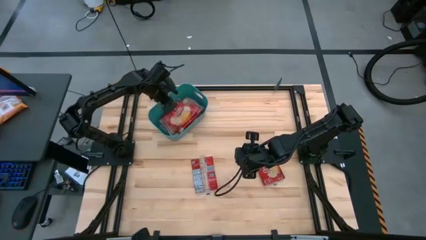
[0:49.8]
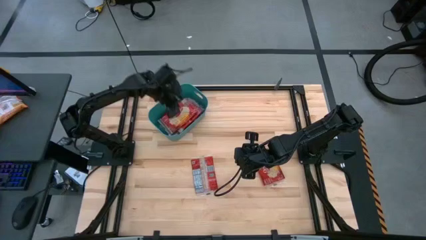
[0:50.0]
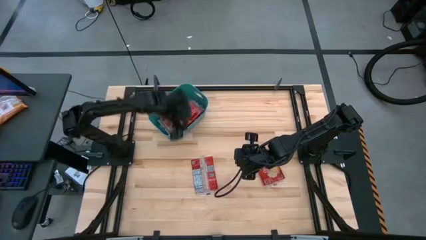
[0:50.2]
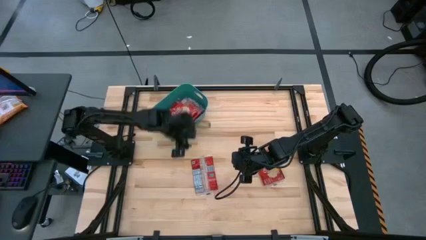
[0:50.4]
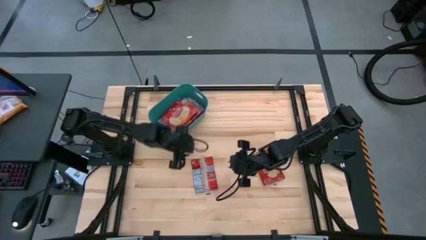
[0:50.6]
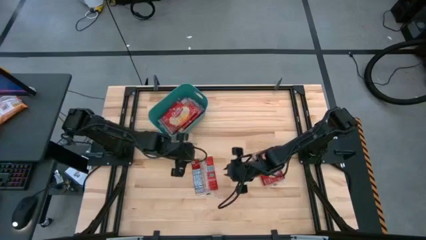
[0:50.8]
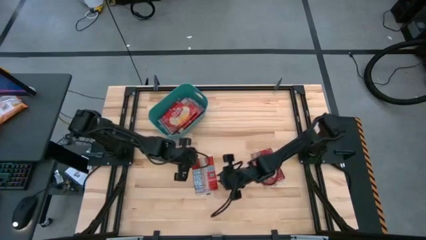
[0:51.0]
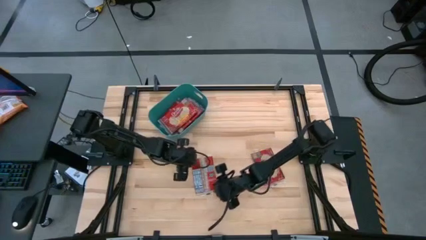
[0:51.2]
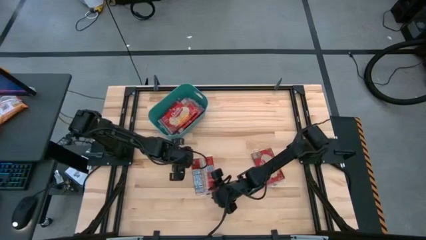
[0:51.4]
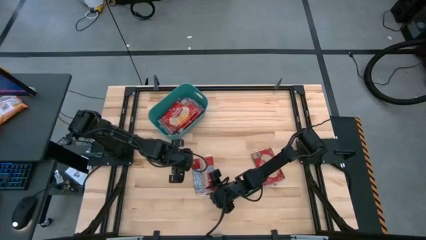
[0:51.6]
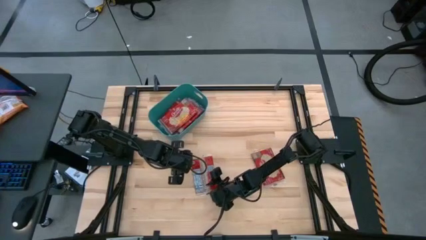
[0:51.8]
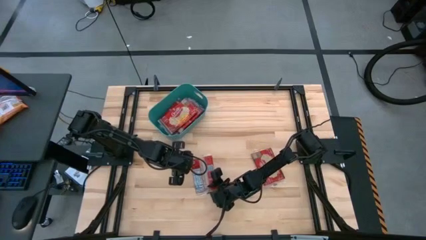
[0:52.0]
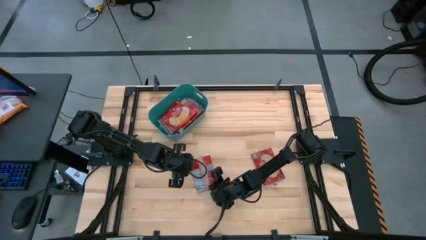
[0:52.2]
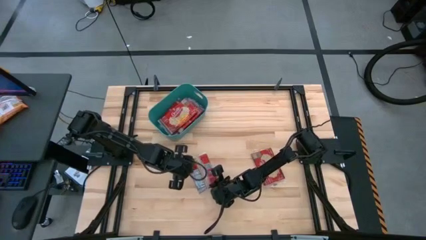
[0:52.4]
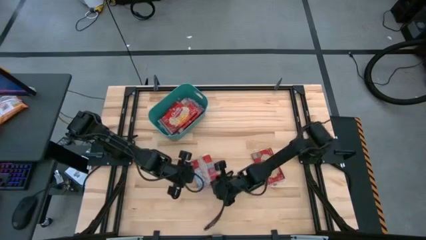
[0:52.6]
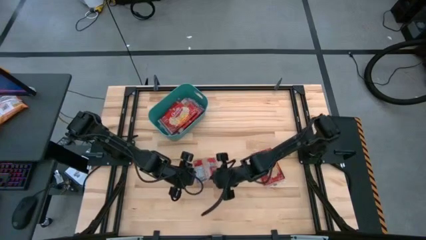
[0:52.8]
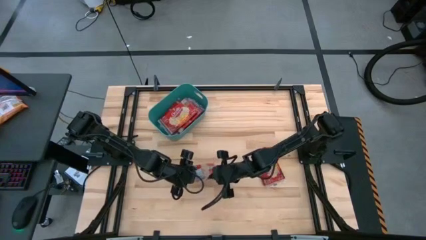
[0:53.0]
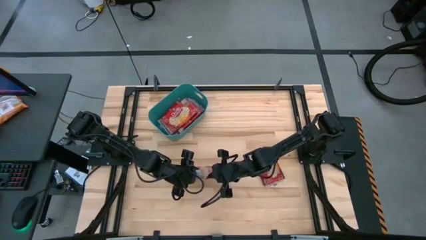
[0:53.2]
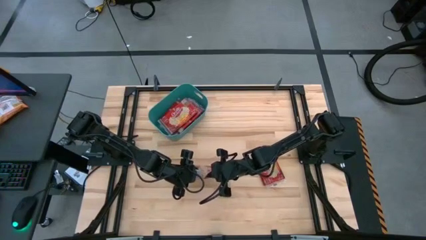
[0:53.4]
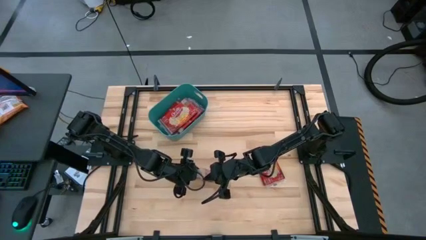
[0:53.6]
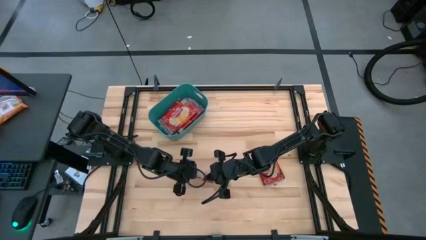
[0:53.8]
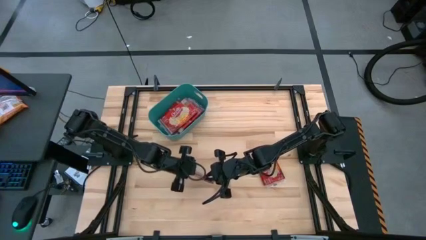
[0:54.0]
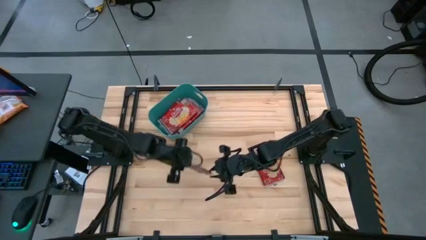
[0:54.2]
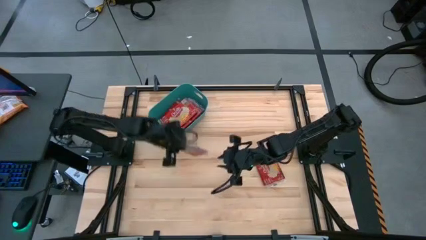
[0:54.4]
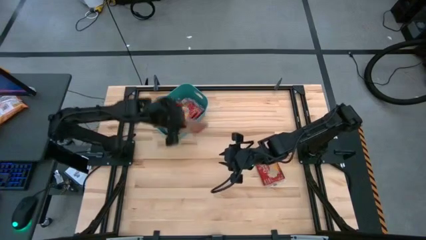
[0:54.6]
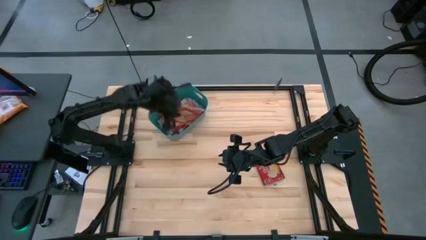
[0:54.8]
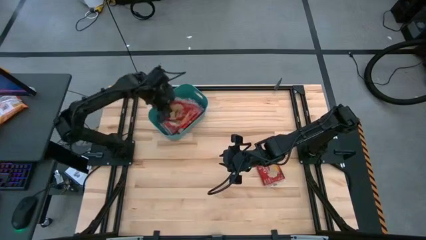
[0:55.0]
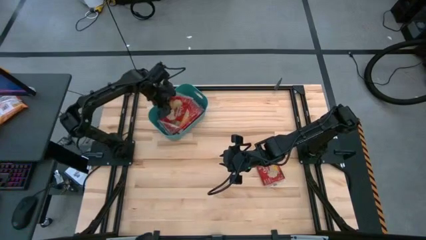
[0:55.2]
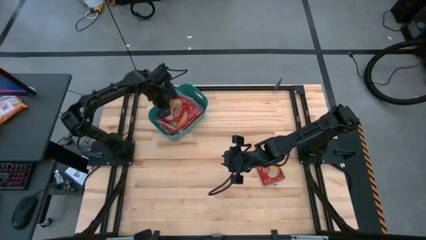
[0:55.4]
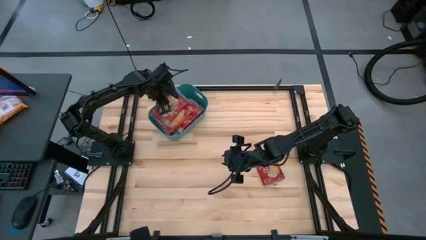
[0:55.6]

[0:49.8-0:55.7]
Task: Sort popcorn bags into baskets
Put the red popcorn bag into the blue bin

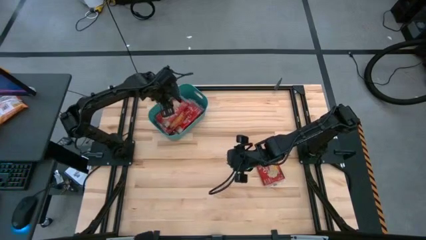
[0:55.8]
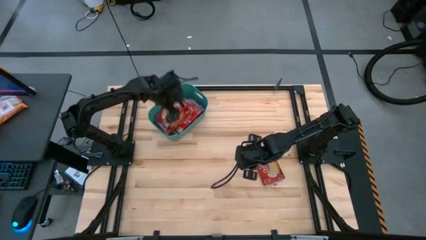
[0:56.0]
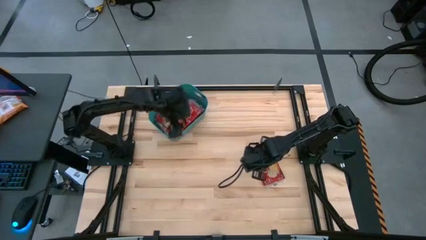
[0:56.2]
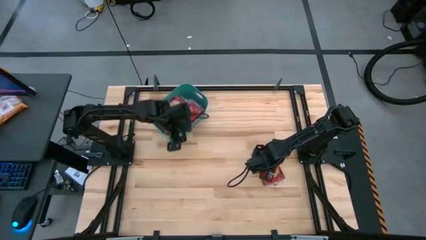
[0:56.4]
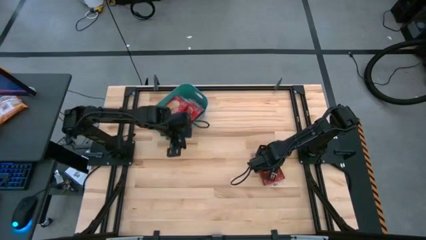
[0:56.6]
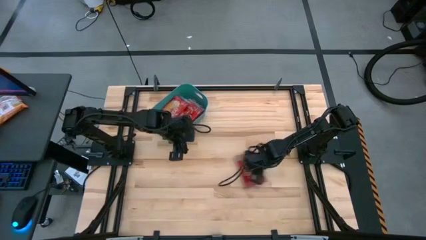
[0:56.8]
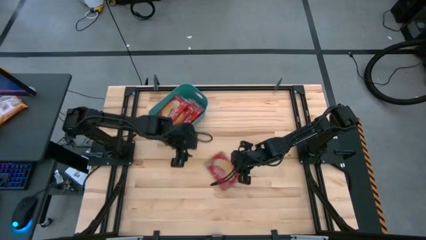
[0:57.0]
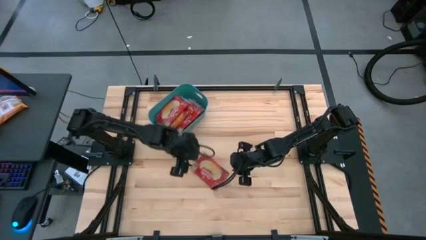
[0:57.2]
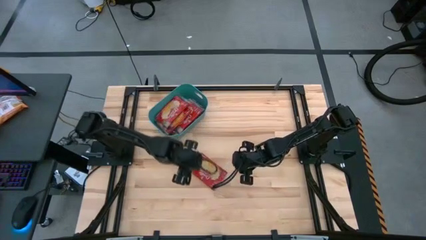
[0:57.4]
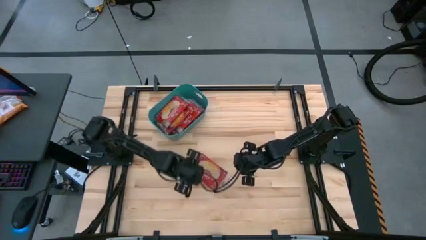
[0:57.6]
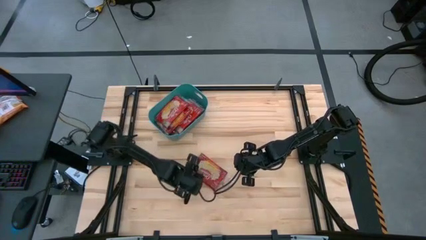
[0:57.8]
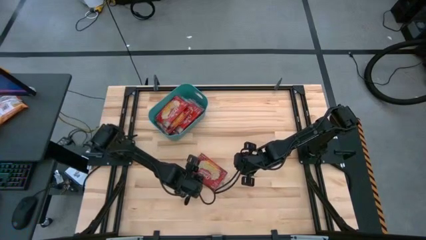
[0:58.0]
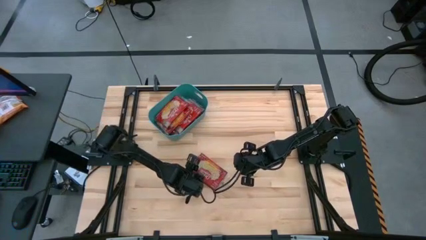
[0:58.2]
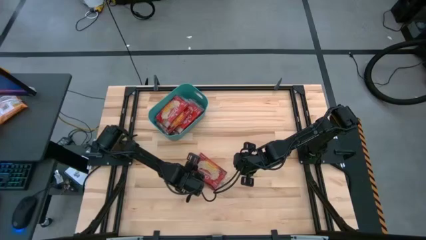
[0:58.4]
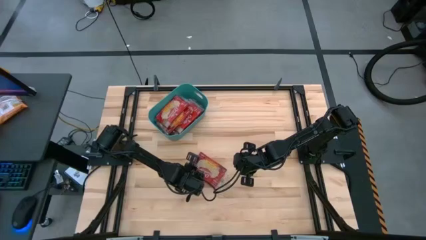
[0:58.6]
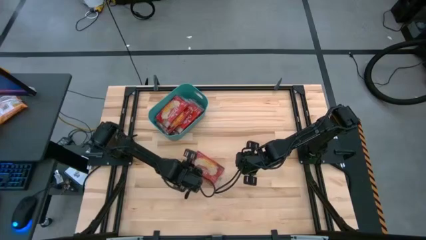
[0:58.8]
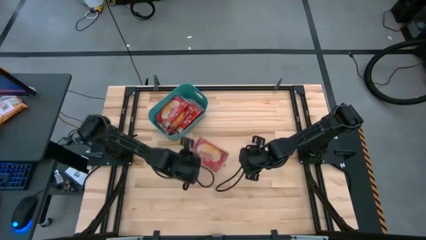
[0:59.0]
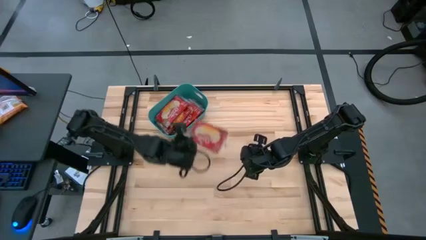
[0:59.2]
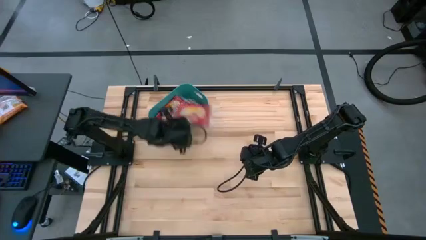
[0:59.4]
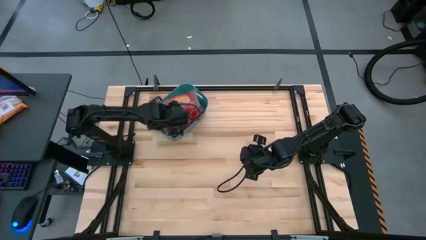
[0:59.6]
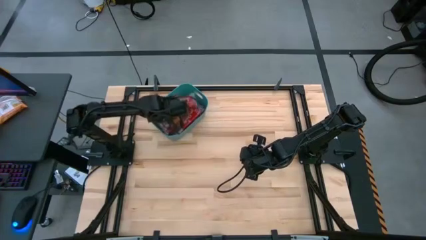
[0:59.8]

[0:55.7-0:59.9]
Put the red popcorn bag into the blue bin

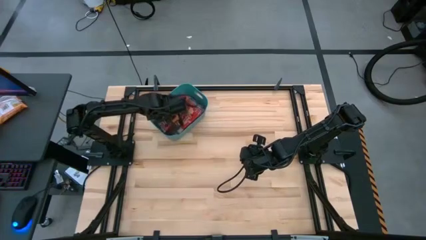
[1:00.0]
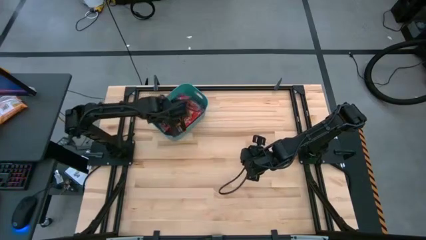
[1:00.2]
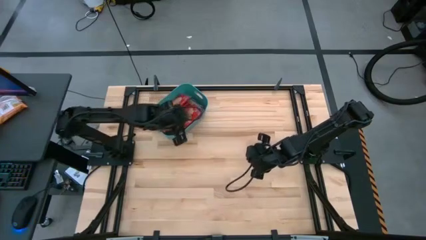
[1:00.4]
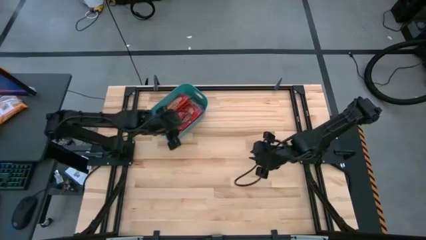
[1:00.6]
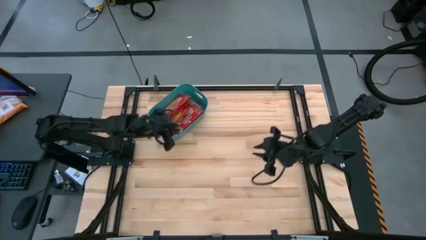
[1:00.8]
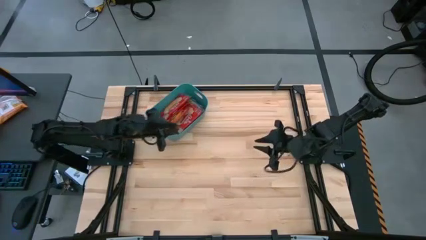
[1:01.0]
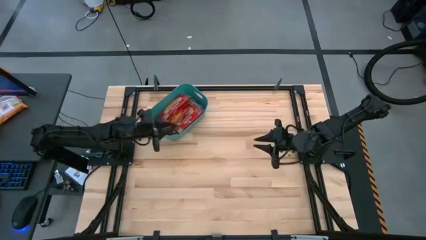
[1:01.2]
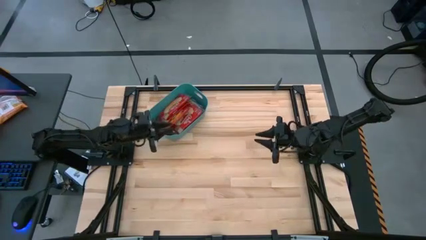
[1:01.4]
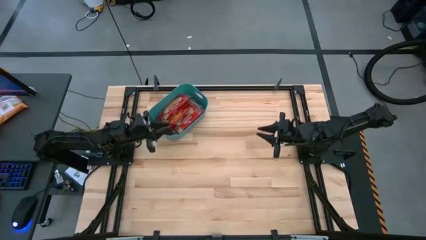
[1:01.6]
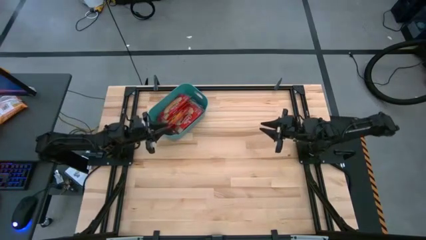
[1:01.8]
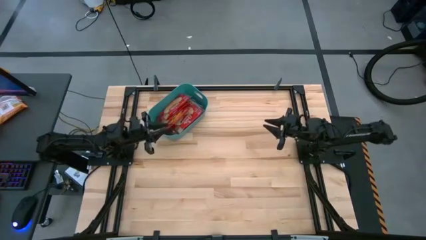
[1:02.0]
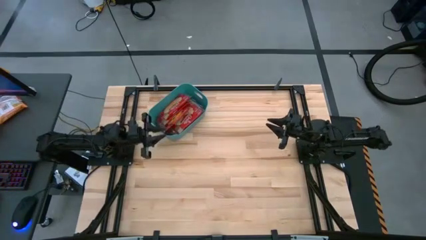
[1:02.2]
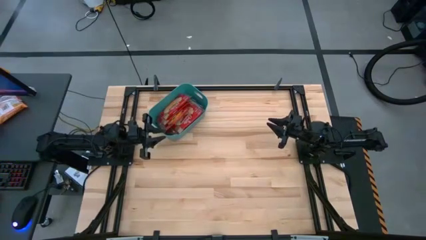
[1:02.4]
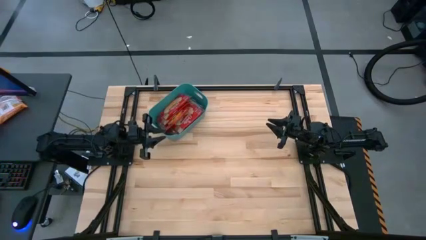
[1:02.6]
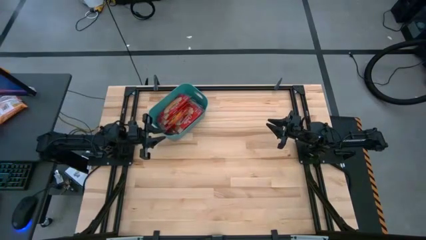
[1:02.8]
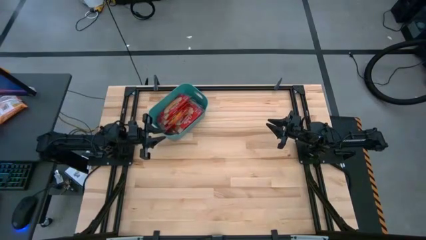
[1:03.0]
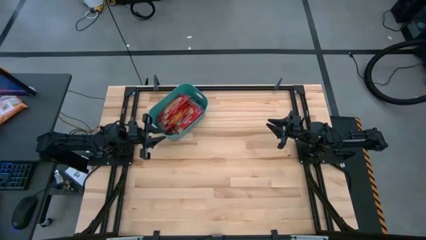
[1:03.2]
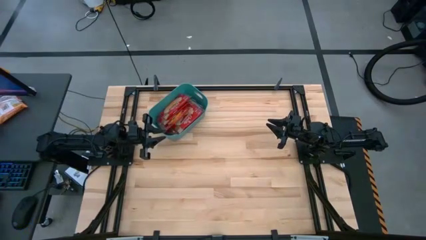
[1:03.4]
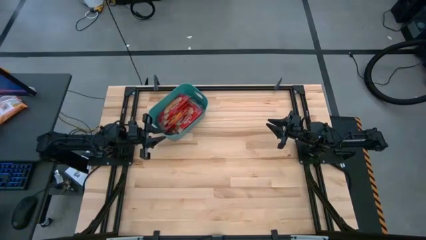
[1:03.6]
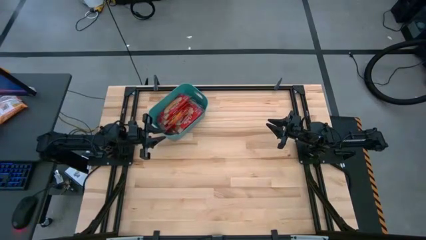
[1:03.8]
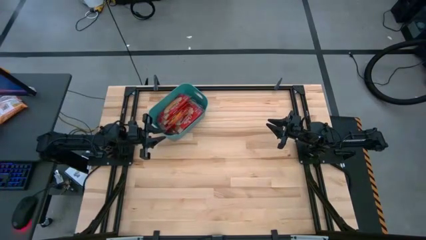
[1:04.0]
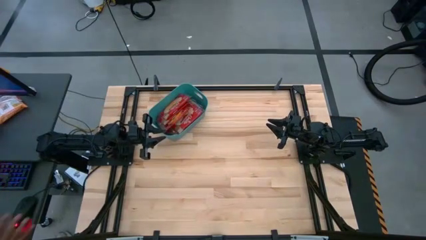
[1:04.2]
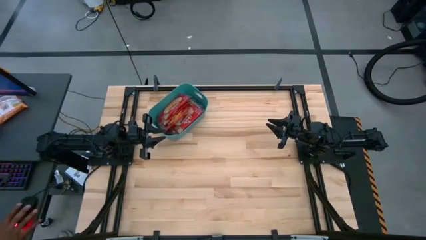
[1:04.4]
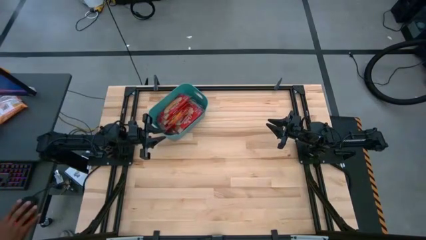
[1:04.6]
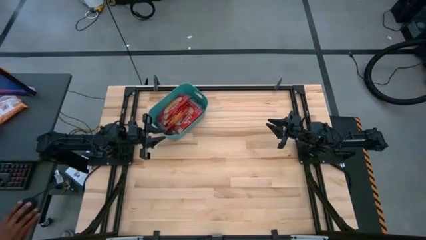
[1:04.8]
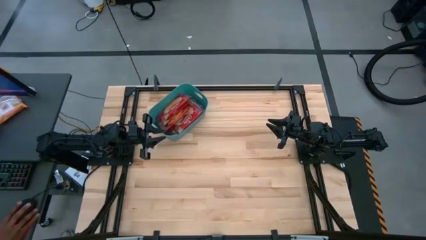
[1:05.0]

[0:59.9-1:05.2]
Return to Home Position

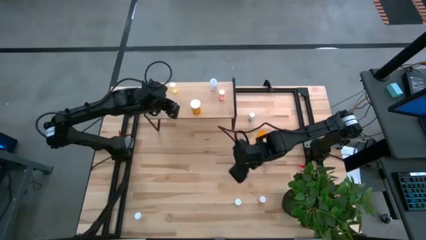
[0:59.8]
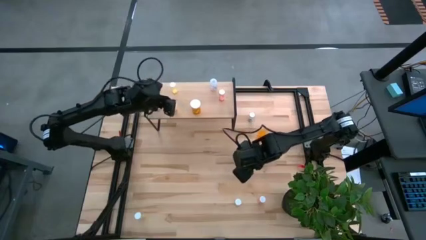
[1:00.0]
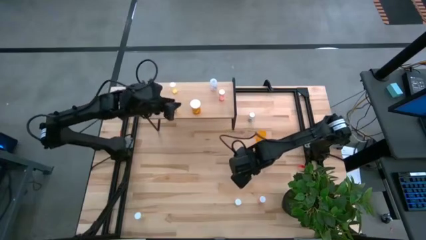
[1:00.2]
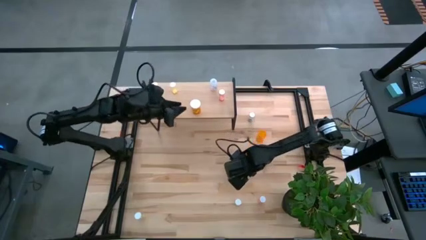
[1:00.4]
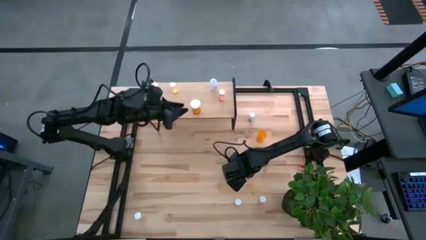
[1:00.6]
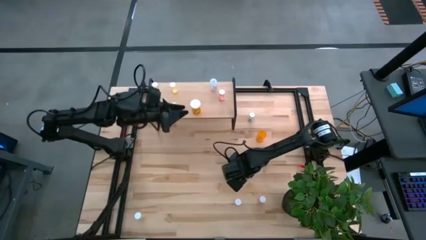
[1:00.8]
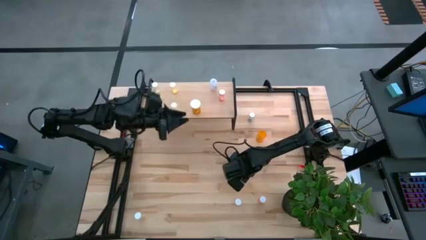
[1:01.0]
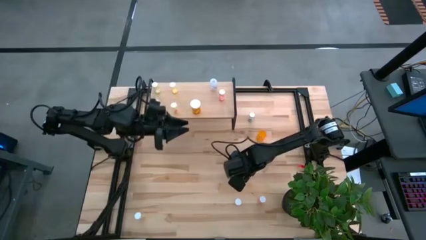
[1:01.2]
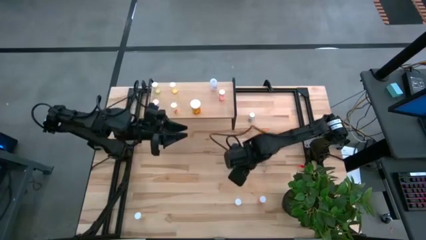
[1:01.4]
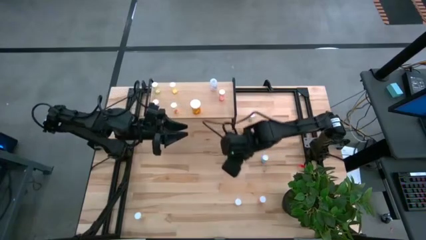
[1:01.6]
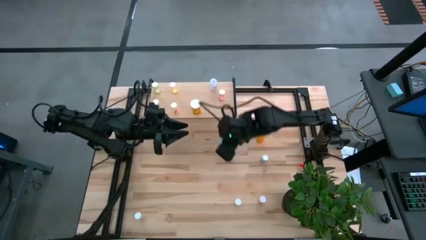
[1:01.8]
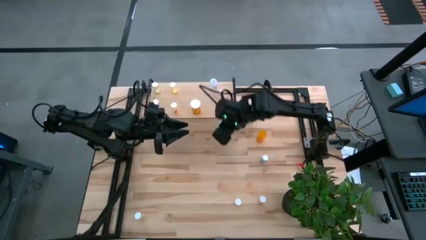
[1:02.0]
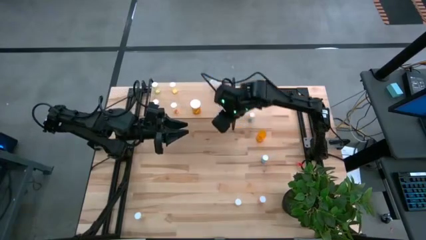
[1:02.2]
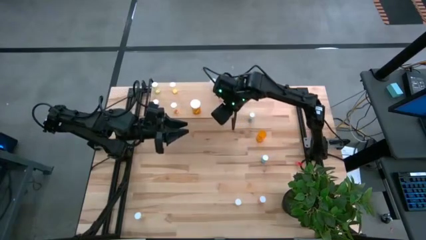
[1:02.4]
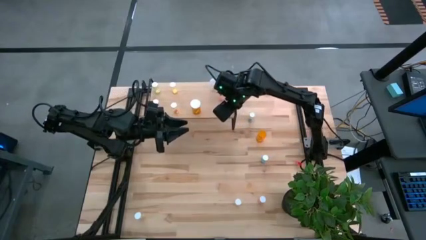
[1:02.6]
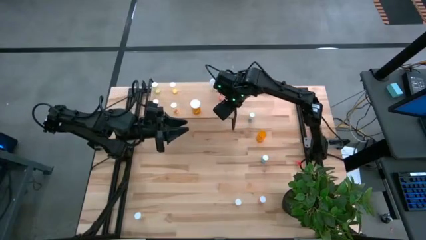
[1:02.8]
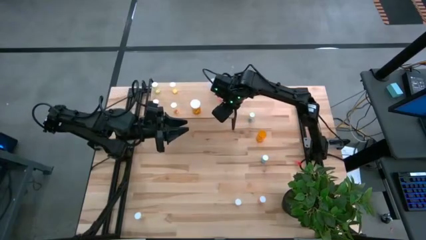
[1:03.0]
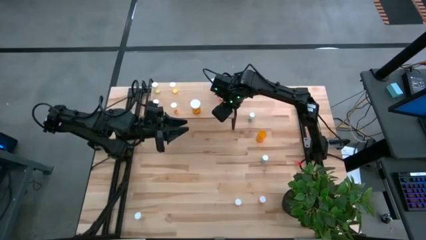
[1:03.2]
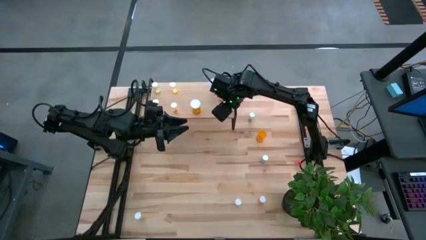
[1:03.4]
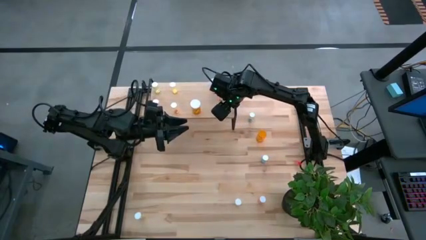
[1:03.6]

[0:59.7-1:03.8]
Task: Pick and place medicine bottles onto shelf by color
Put the blue pill bottle on the shelf
